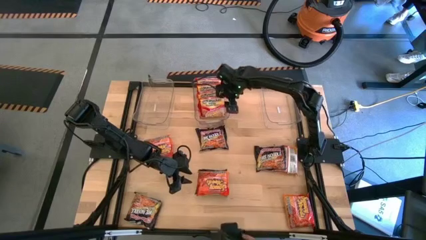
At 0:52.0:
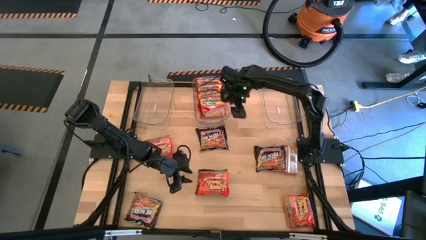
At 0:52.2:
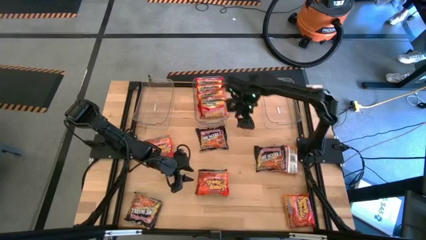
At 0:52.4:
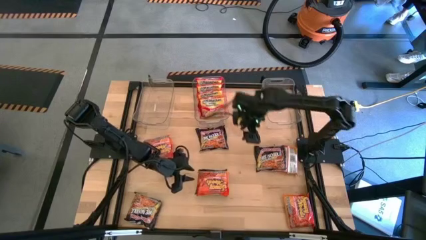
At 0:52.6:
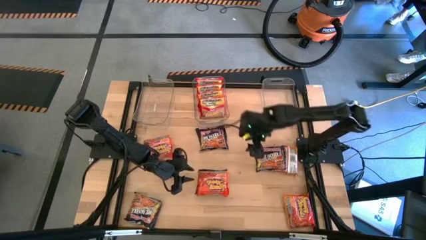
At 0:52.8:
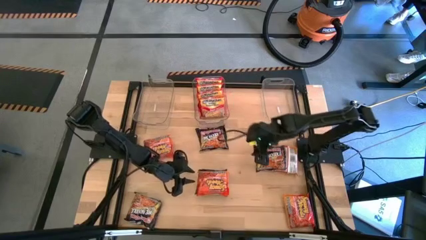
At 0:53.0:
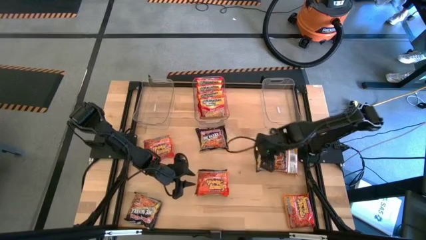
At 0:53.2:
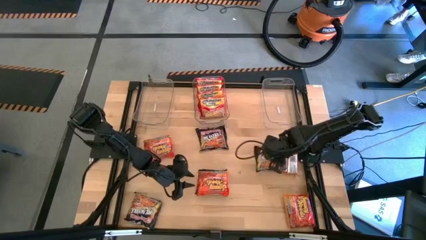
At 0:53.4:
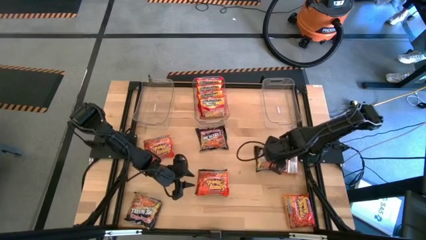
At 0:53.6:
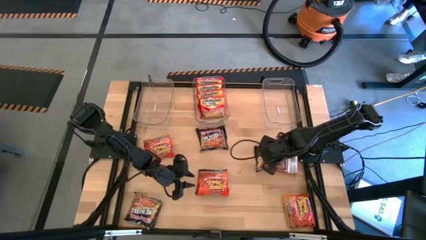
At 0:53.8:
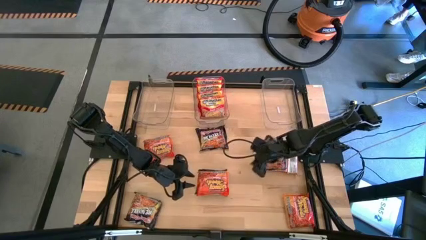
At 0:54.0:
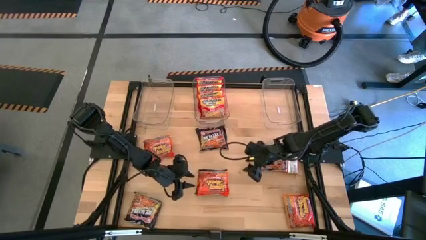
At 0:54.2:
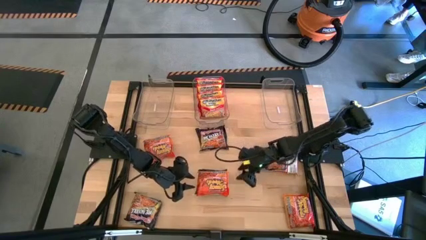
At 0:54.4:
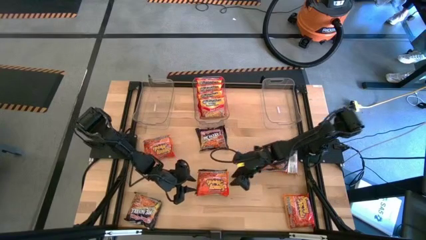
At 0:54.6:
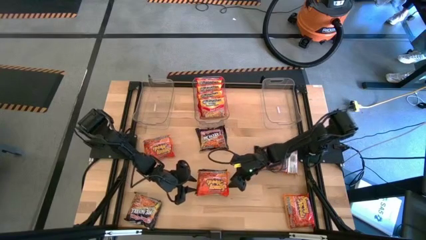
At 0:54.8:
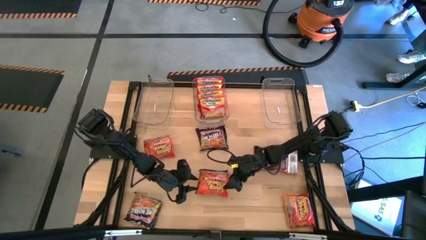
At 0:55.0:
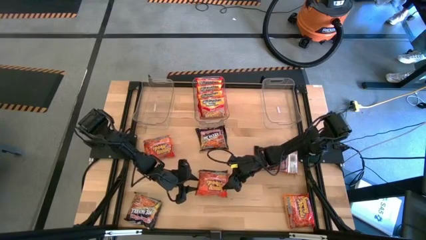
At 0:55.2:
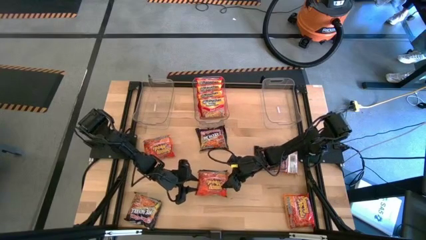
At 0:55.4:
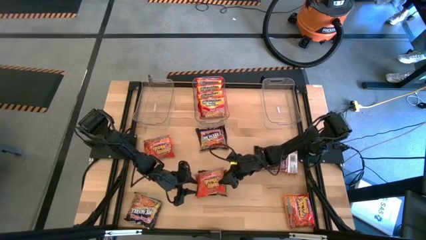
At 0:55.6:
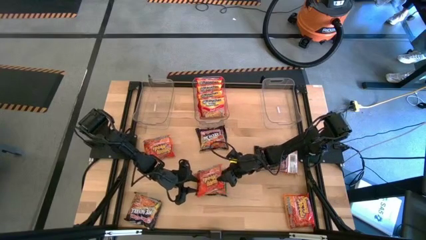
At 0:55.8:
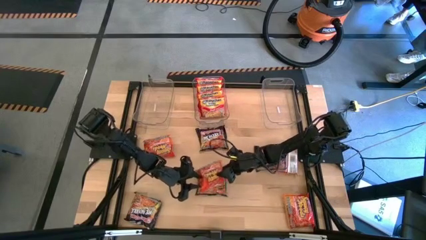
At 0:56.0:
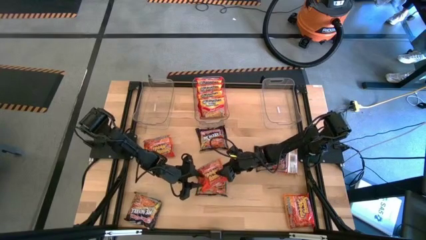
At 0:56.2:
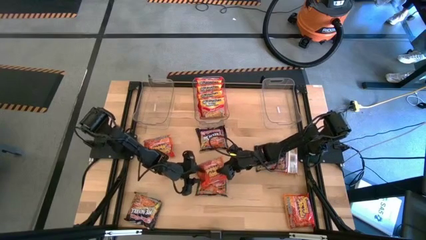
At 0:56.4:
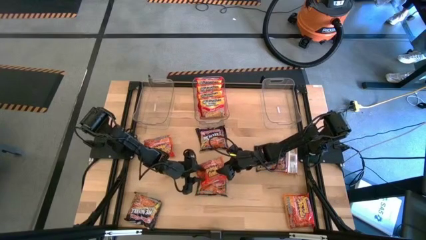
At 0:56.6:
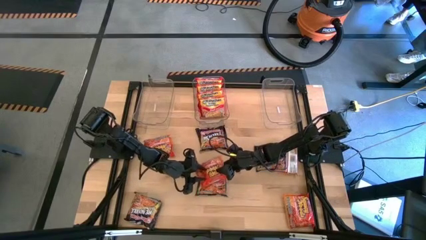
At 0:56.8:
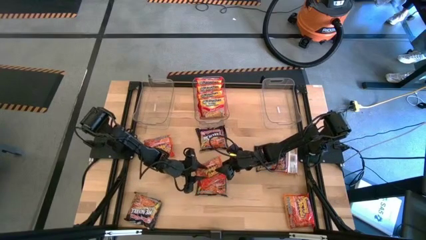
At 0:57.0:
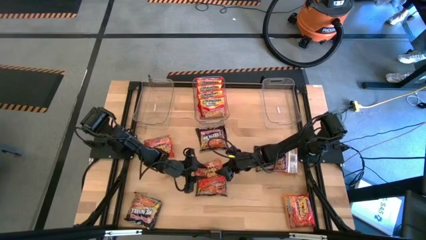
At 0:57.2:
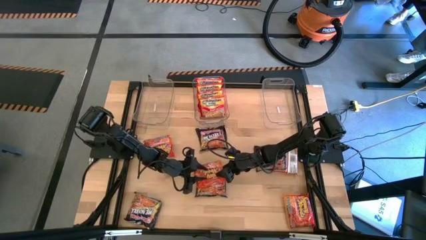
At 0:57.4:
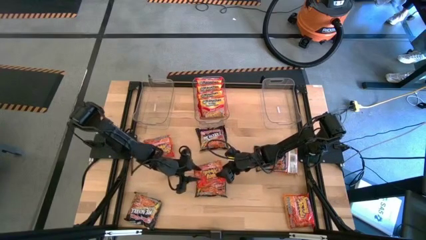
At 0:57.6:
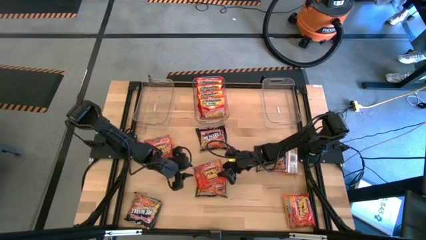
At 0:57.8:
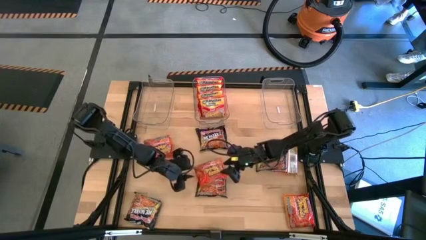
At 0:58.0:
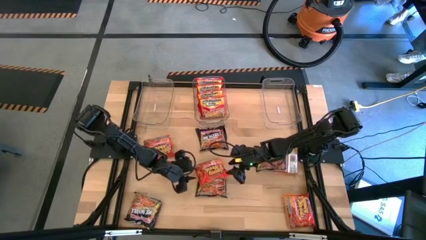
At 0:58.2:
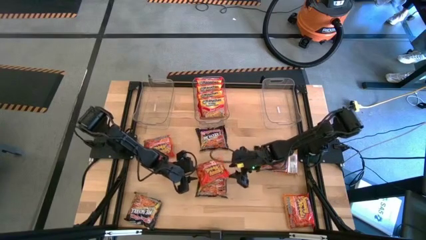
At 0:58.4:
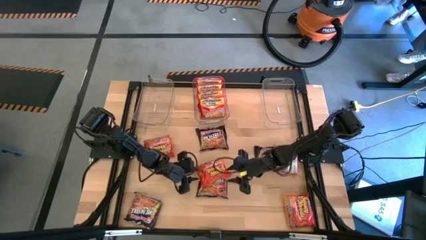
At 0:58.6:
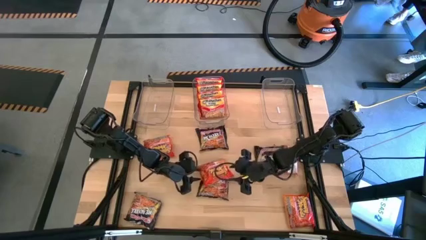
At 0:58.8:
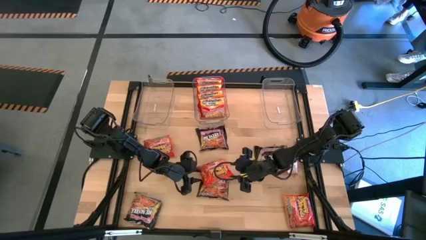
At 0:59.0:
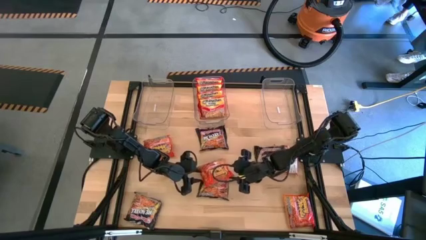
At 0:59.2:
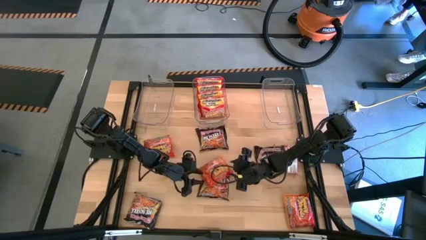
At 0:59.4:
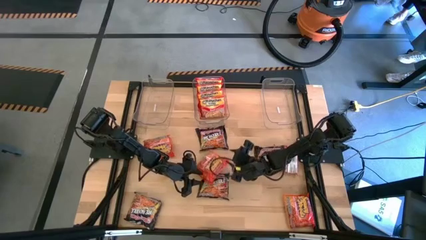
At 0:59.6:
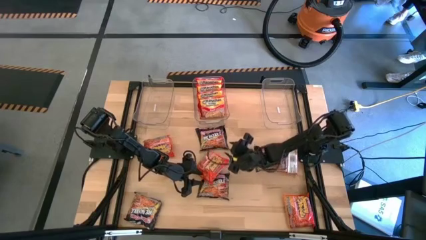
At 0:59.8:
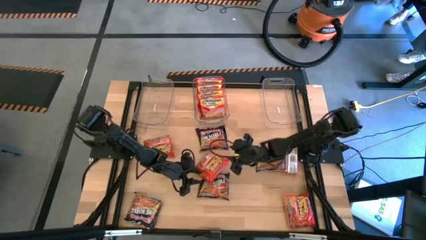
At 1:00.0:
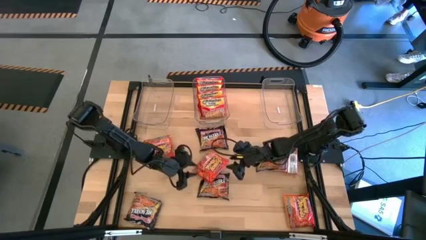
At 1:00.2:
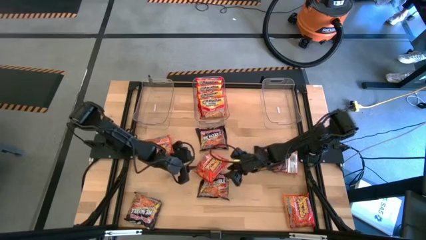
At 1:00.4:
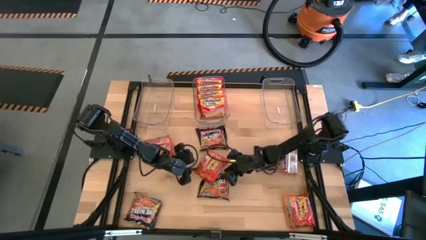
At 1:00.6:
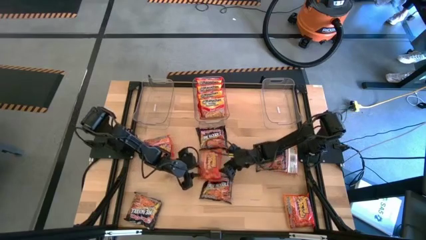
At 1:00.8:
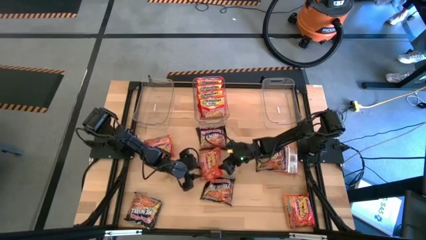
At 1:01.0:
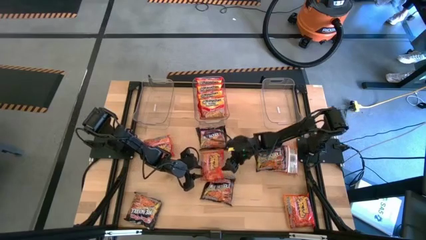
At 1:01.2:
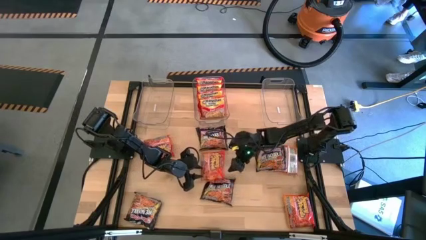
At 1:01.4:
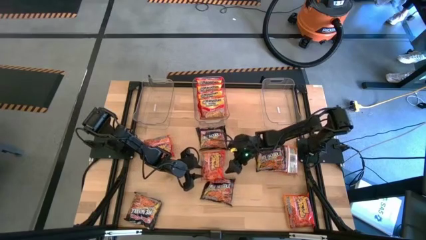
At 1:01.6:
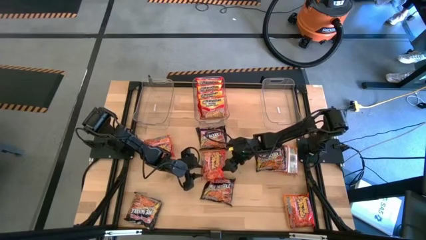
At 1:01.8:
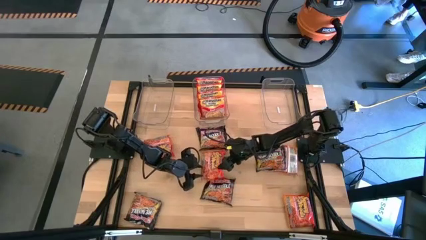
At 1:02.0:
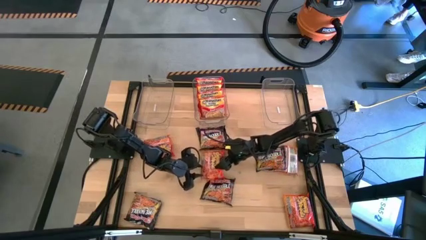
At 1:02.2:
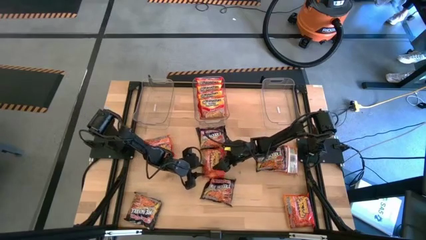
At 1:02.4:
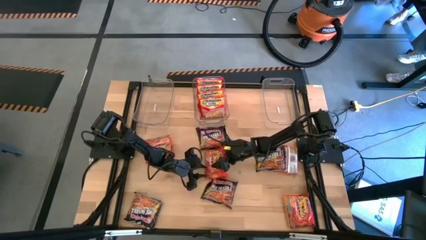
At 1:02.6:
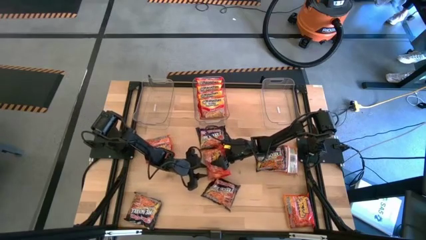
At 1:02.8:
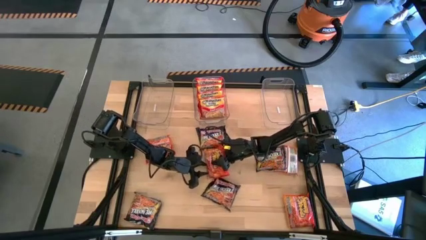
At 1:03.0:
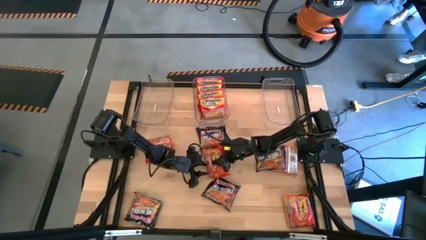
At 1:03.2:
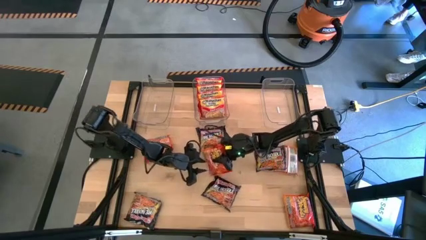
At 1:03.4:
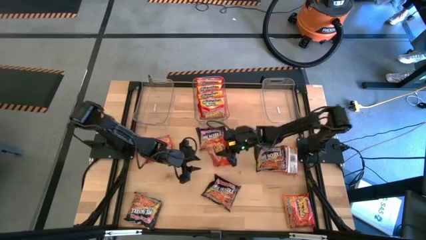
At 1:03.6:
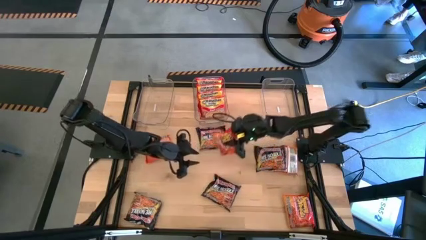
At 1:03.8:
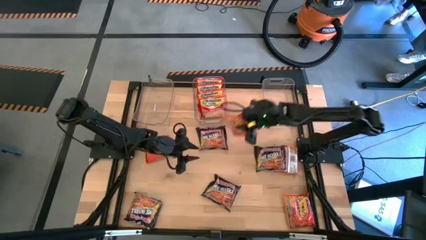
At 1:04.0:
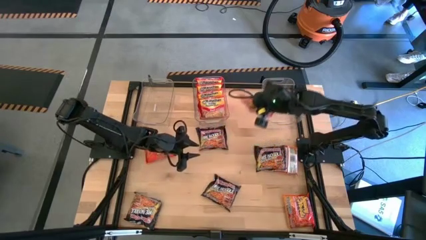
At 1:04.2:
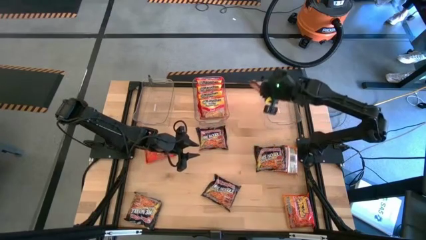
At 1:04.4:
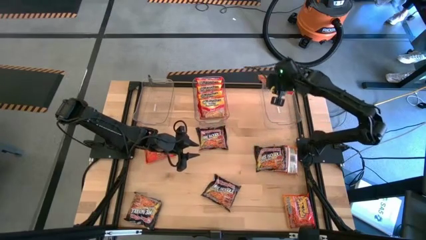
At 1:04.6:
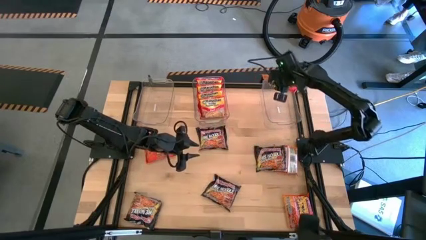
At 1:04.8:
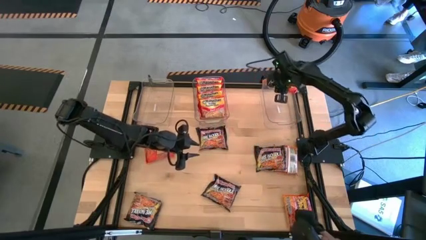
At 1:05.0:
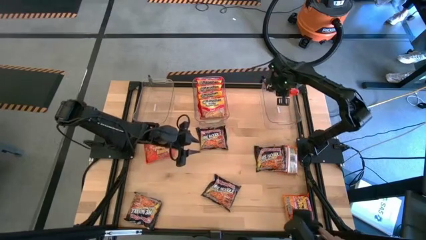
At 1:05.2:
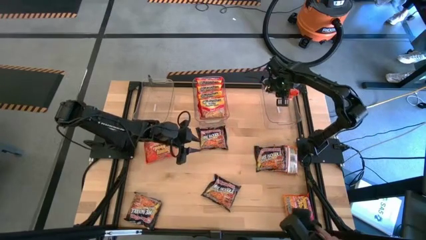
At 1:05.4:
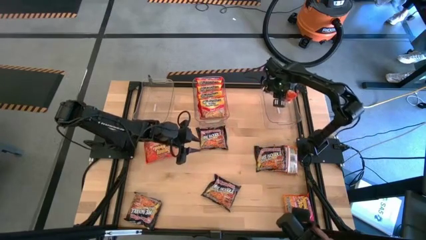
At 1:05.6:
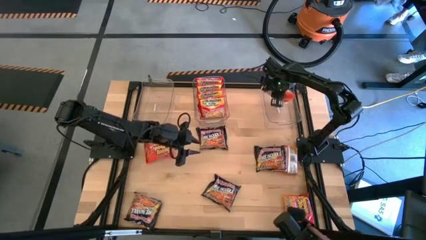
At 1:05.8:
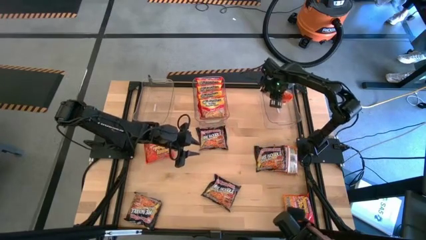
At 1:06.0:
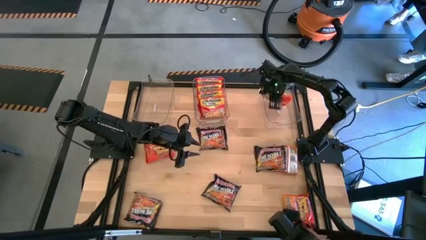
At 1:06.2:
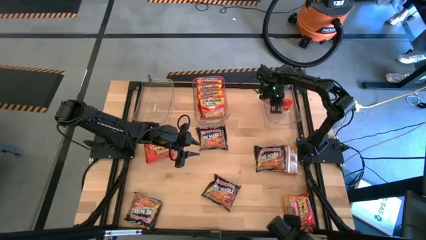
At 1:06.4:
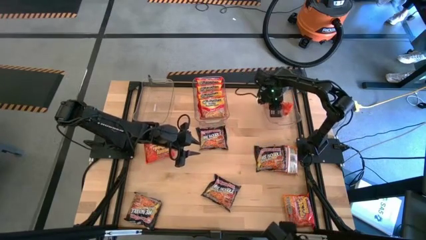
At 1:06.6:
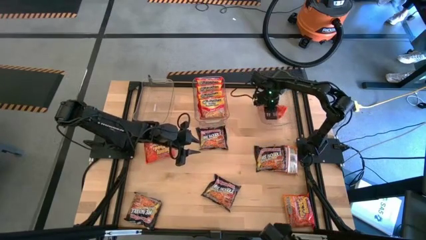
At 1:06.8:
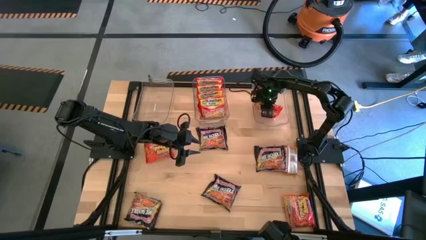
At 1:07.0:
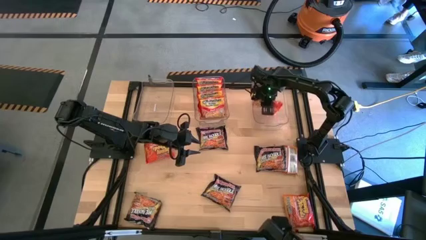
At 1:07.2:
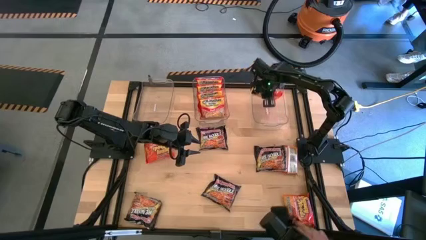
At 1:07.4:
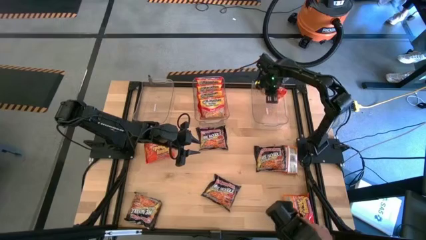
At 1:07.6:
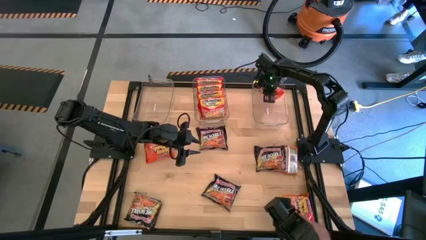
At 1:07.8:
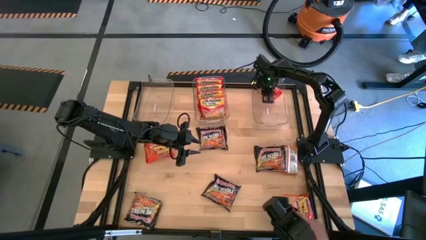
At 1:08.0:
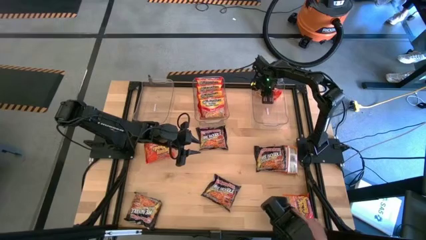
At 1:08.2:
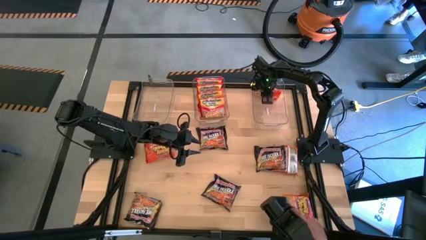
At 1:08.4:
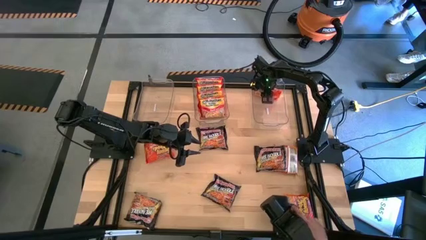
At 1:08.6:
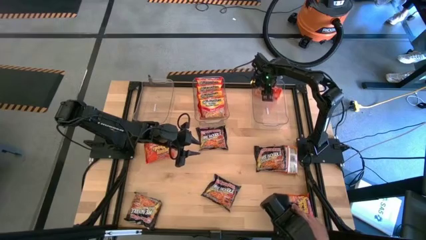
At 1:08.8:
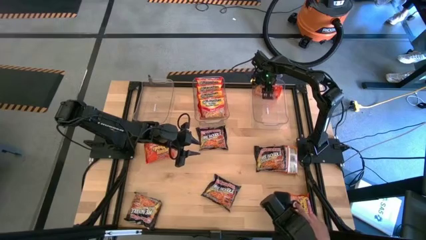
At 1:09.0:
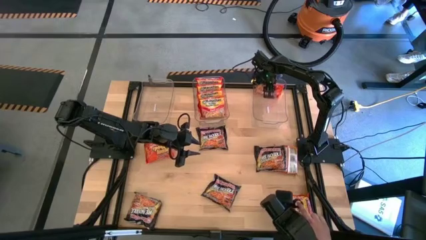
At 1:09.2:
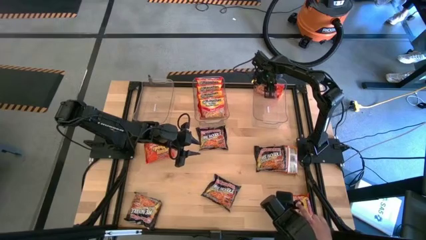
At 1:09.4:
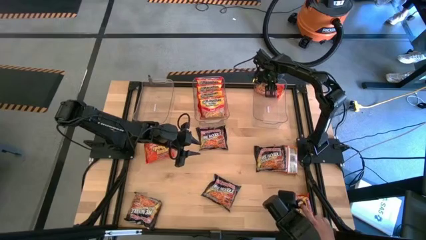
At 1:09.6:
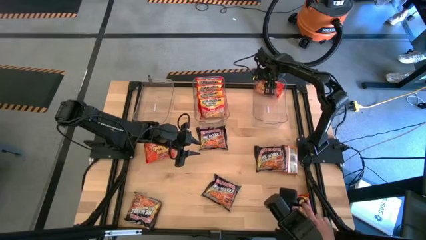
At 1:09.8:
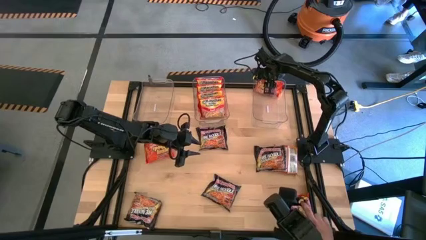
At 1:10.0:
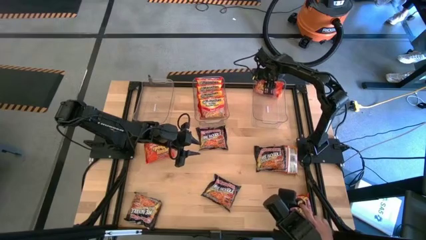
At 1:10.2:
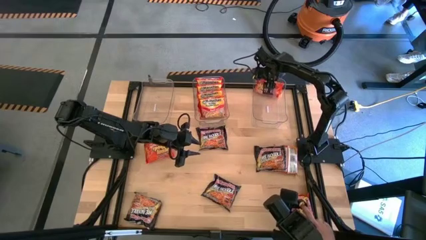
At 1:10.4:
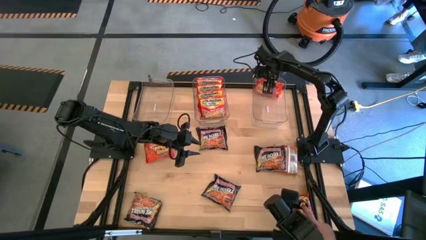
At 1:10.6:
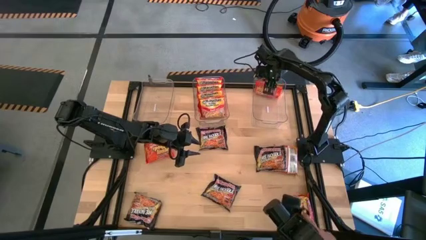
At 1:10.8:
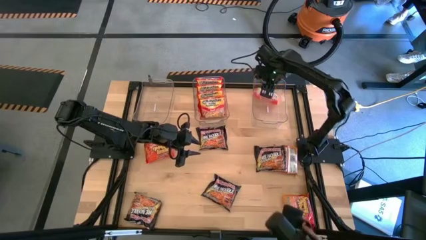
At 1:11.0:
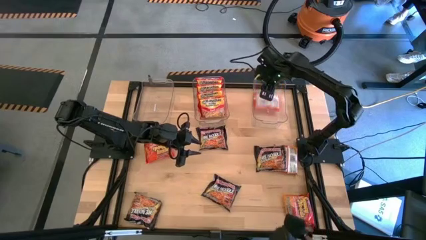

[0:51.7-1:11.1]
Task: Sort Maruchan noodles
Put the bottom left orange noodle pack into the right transparent bin
